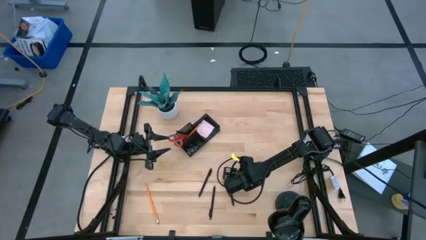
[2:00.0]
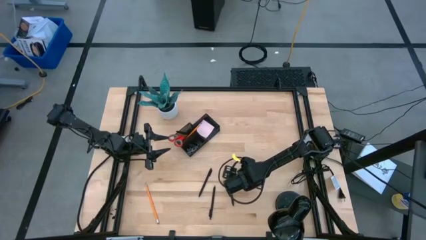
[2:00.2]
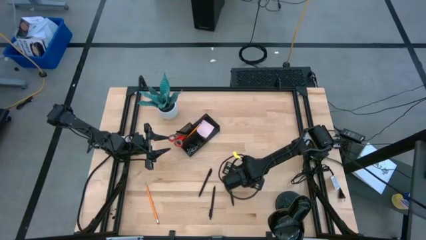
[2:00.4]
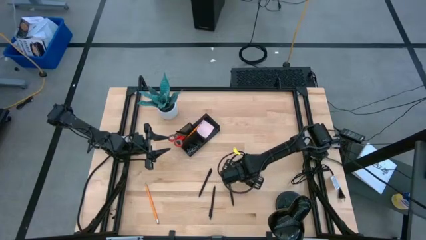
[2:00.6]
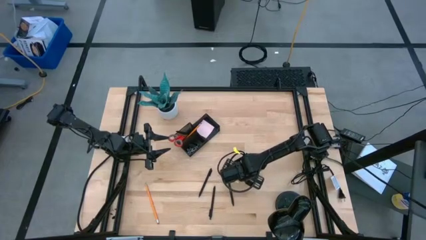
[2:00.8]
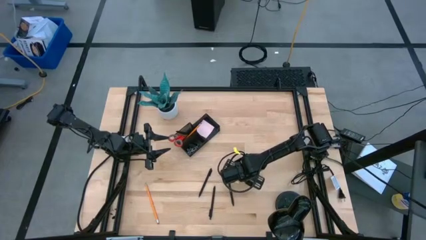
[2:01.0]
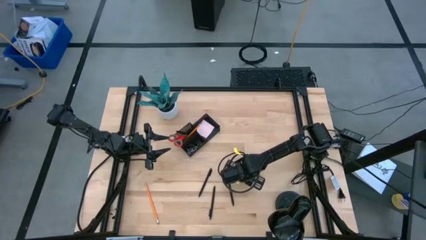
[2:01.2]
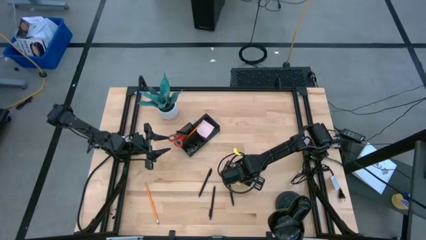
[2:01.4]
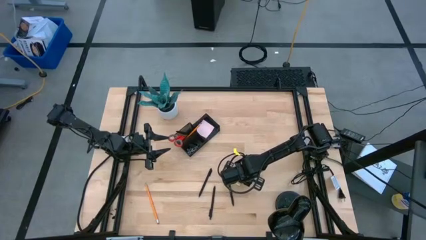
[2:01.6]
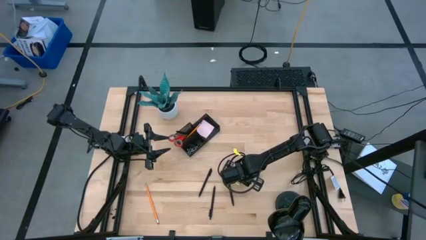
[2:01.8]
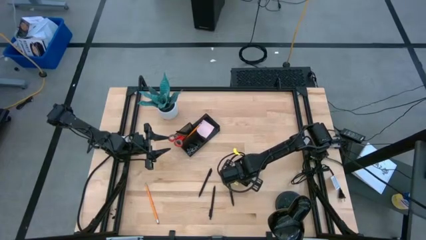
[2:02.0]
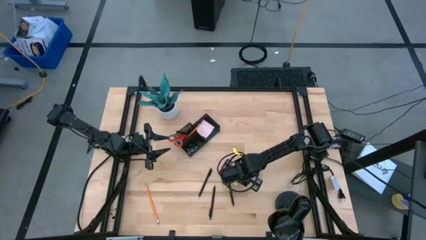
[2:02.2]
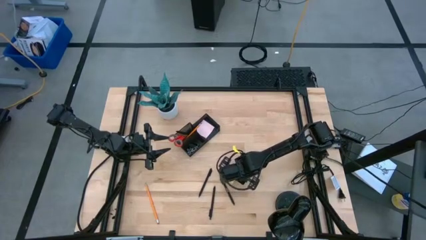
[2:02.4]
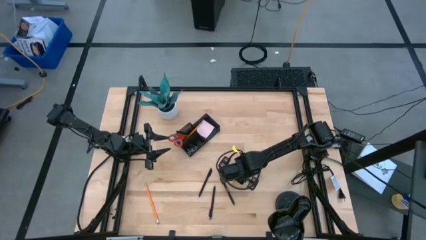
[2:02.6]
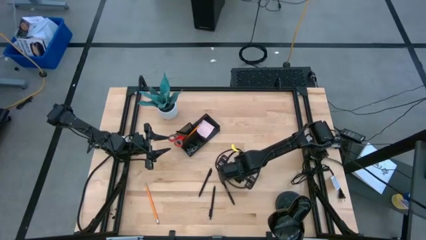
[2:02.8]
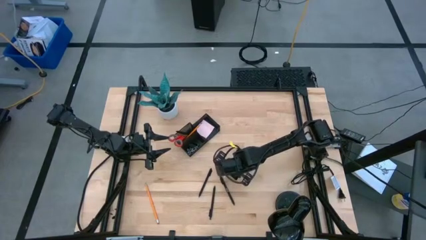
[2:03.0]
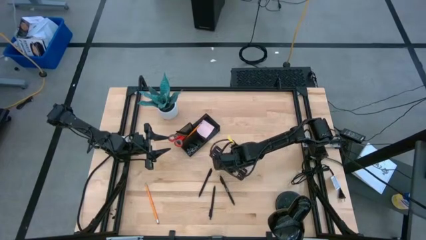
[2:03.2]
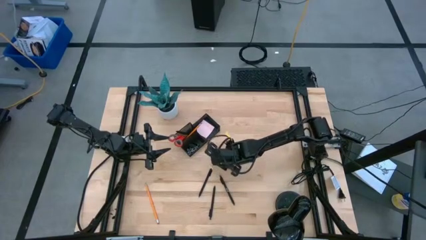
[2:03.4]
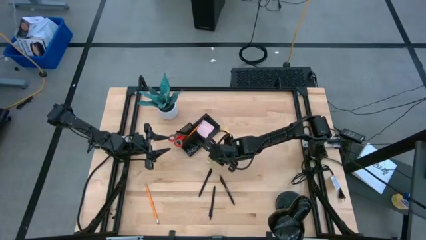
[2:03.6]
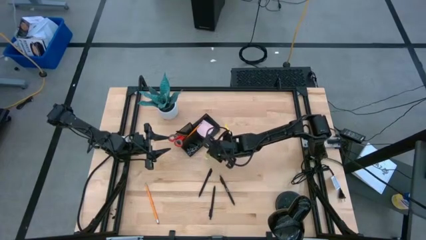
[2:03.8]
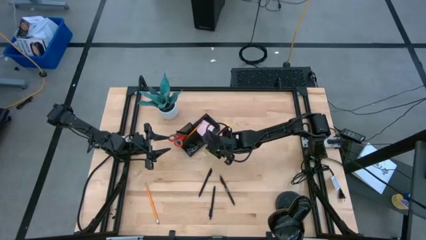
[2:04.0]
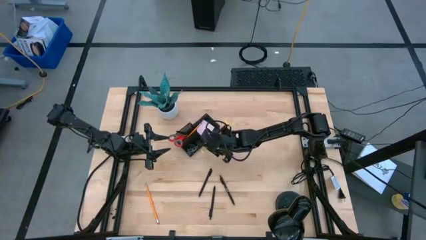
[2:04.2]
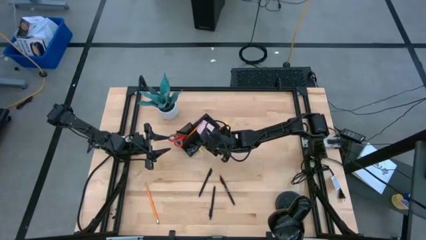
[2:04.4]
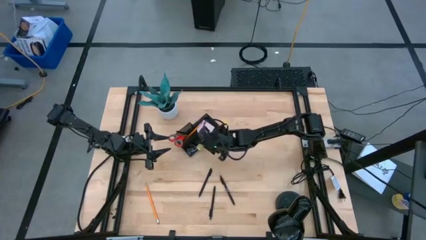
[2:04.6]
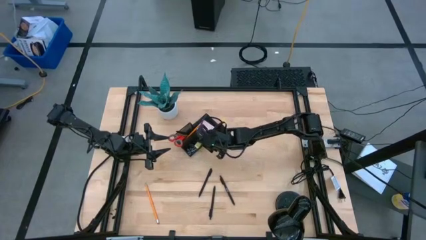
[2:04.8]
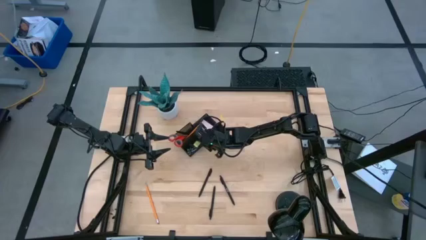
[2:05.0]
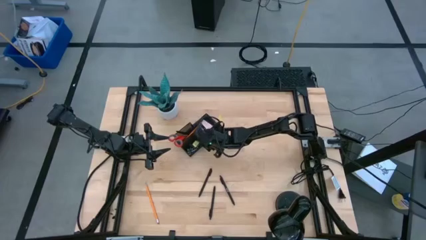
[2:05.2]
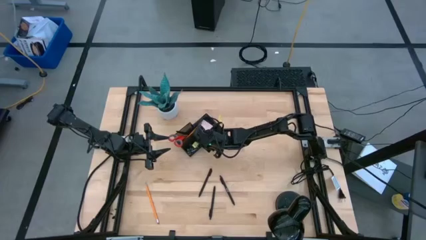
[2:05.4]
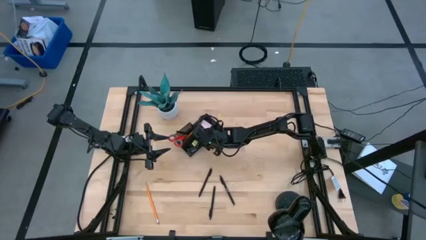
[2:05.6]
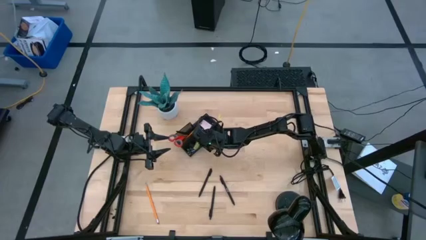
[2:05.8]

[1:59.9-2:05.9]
Task: Pick and place office supplies into organizer
Put the green eraser into the black desk organizer

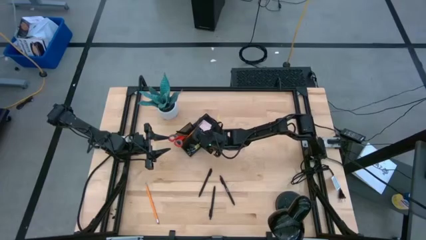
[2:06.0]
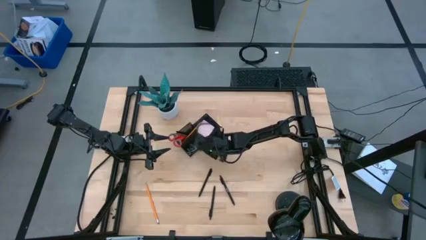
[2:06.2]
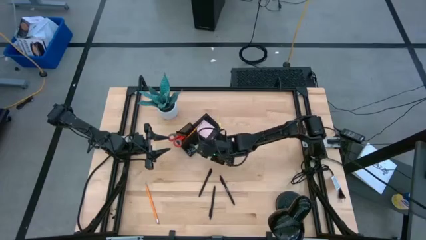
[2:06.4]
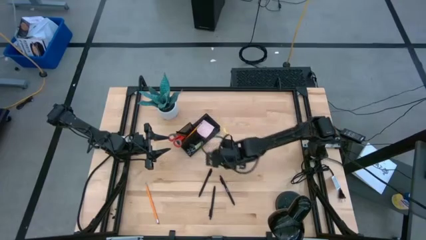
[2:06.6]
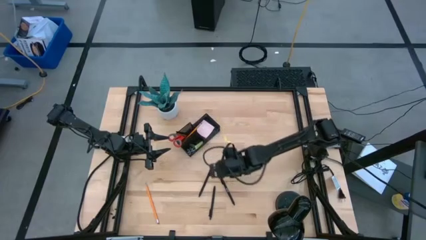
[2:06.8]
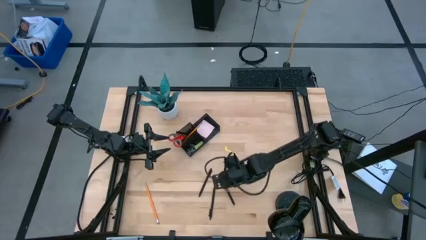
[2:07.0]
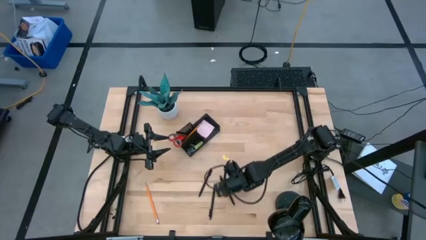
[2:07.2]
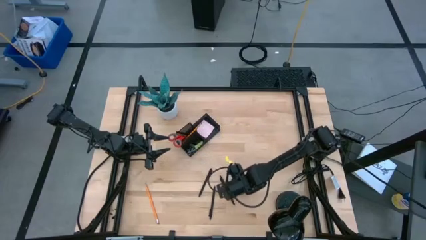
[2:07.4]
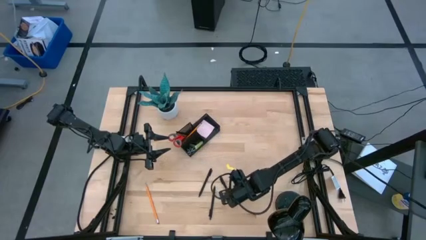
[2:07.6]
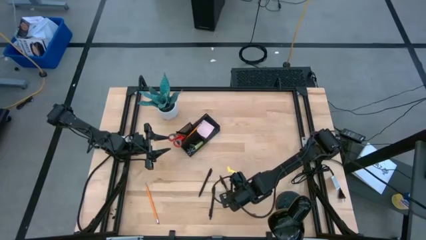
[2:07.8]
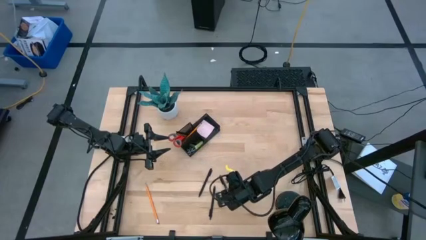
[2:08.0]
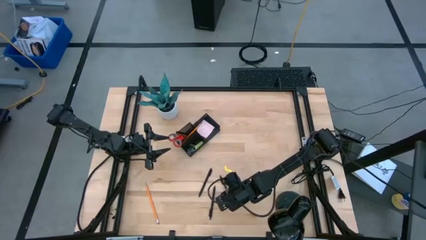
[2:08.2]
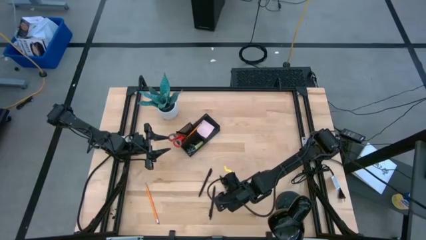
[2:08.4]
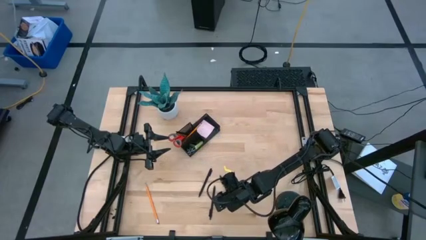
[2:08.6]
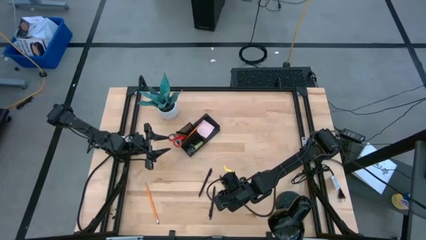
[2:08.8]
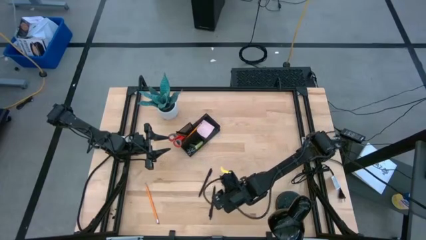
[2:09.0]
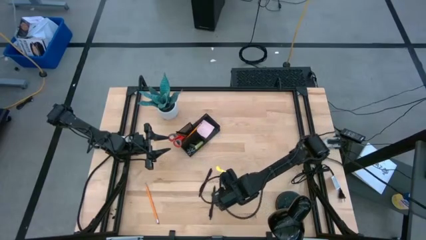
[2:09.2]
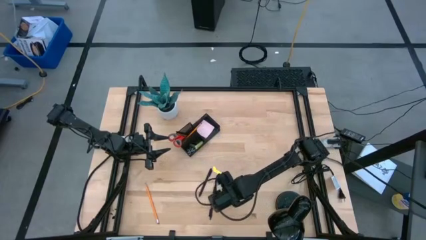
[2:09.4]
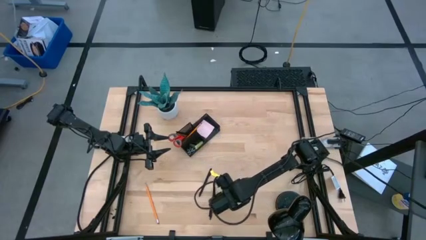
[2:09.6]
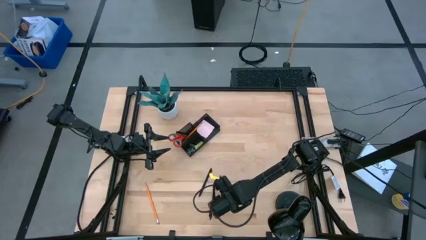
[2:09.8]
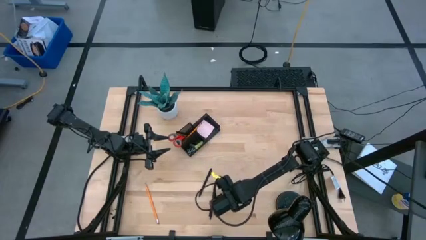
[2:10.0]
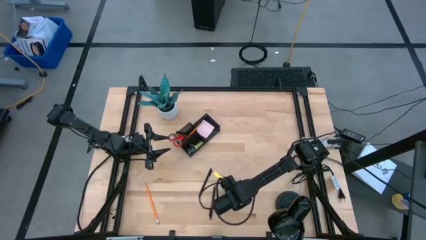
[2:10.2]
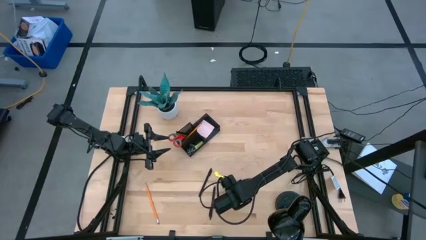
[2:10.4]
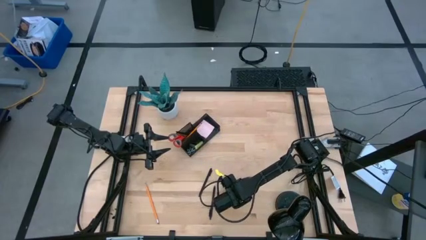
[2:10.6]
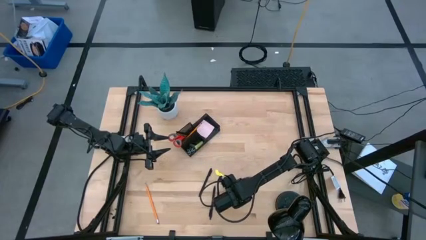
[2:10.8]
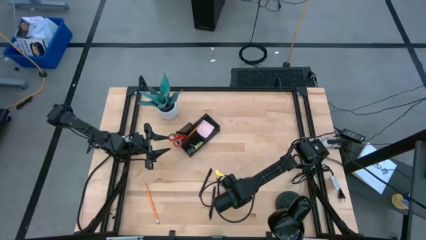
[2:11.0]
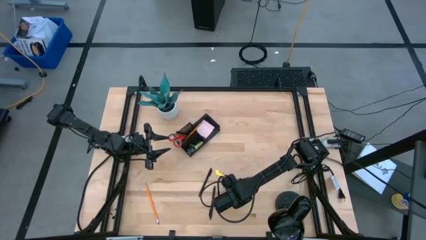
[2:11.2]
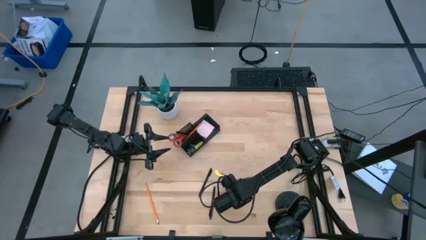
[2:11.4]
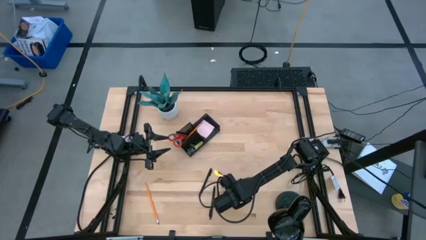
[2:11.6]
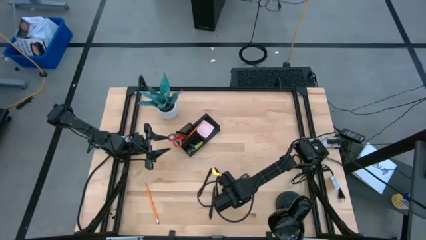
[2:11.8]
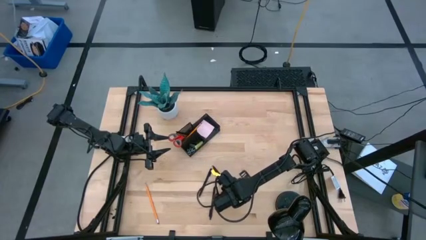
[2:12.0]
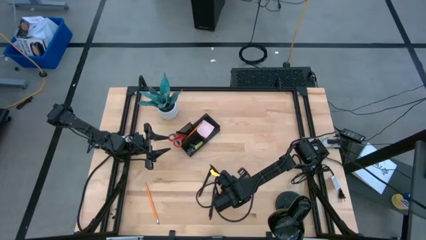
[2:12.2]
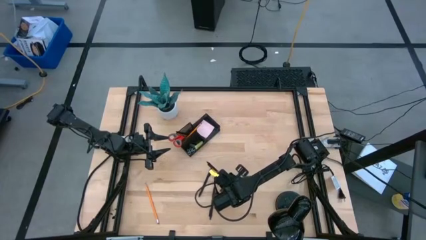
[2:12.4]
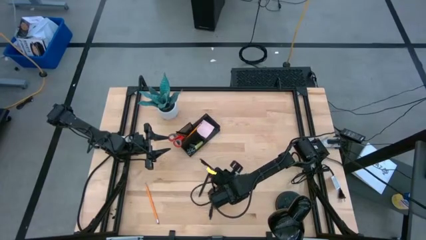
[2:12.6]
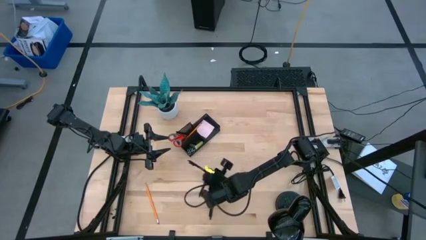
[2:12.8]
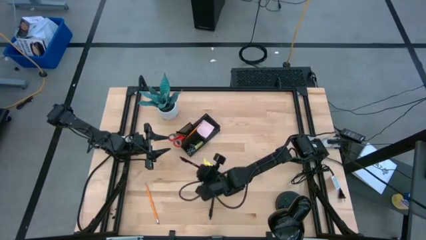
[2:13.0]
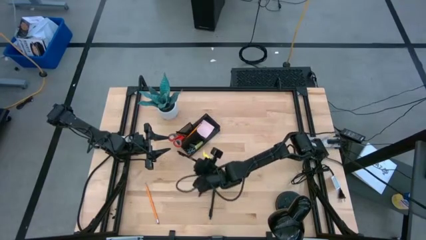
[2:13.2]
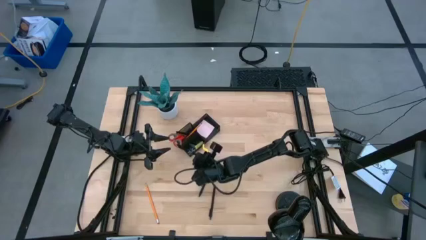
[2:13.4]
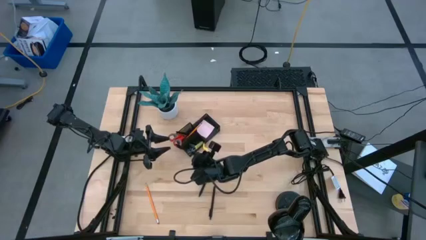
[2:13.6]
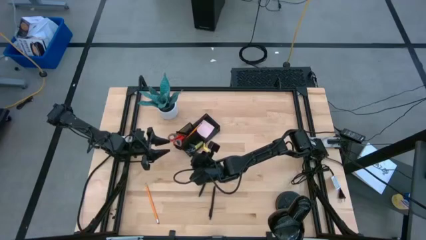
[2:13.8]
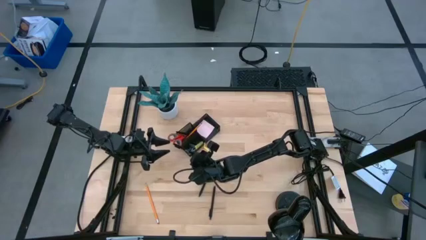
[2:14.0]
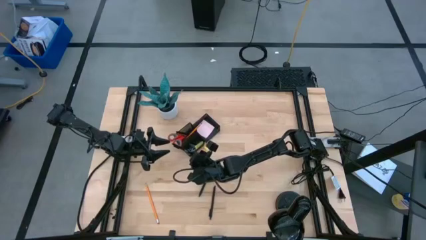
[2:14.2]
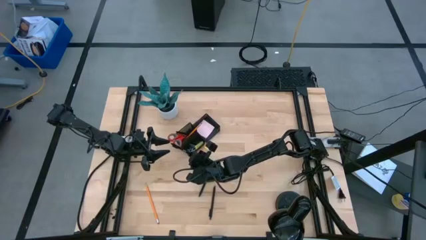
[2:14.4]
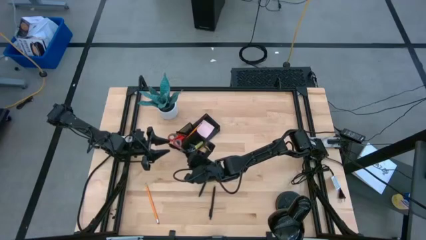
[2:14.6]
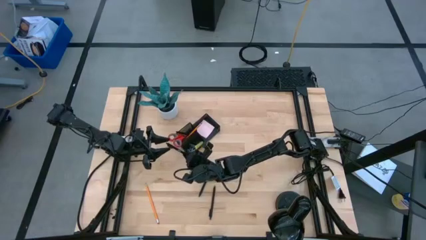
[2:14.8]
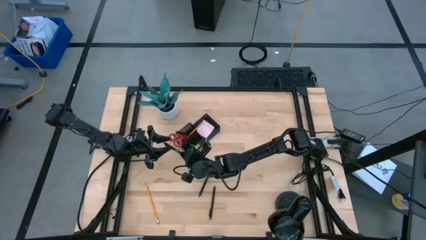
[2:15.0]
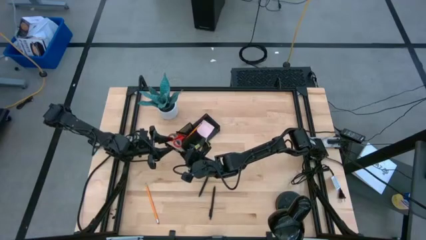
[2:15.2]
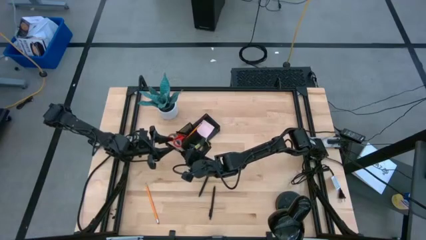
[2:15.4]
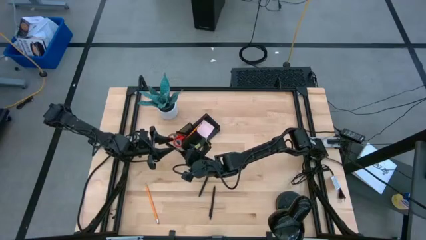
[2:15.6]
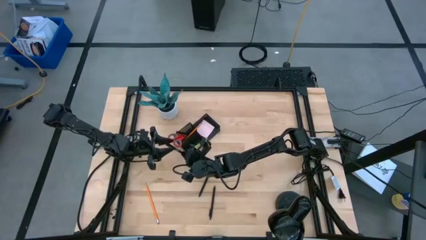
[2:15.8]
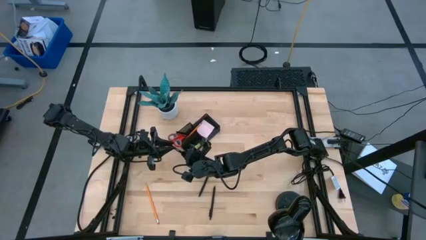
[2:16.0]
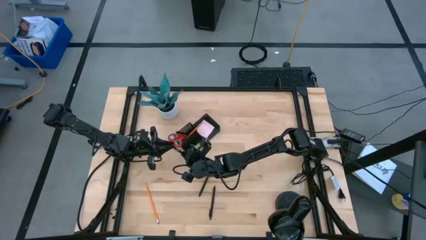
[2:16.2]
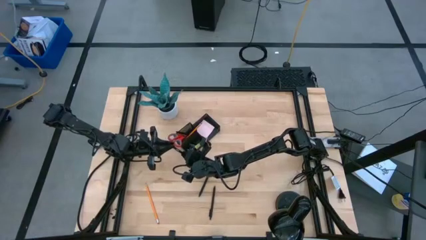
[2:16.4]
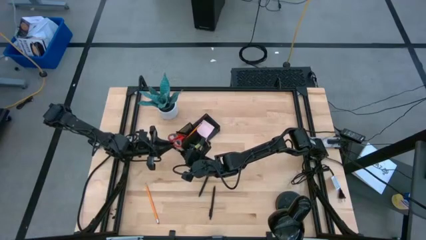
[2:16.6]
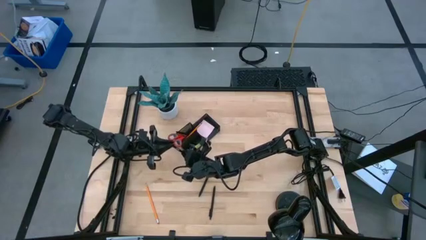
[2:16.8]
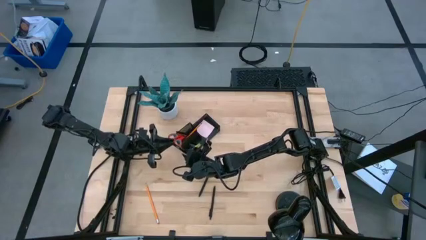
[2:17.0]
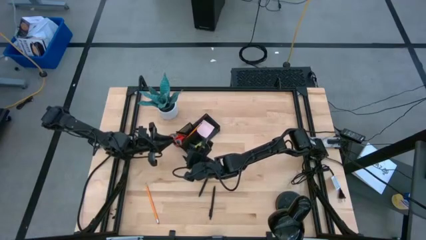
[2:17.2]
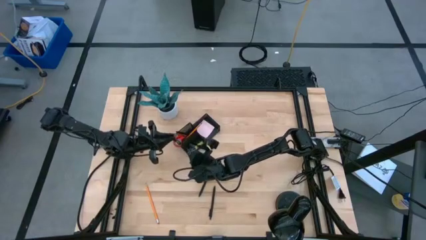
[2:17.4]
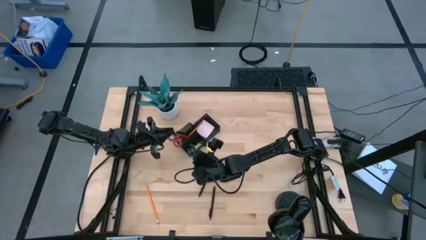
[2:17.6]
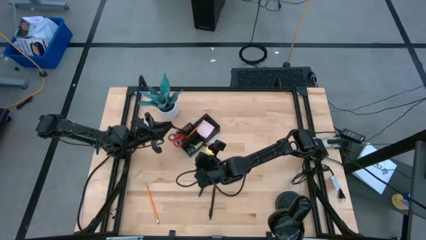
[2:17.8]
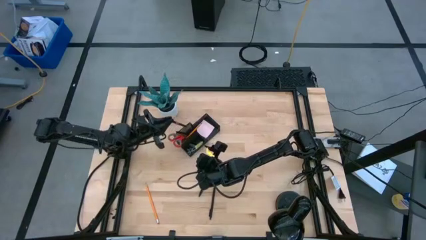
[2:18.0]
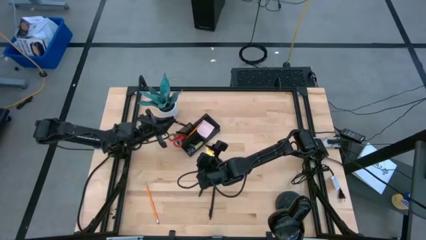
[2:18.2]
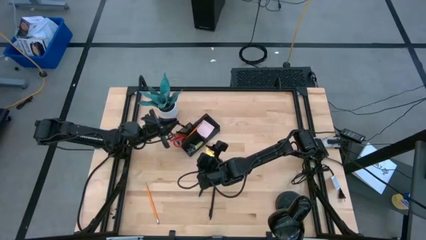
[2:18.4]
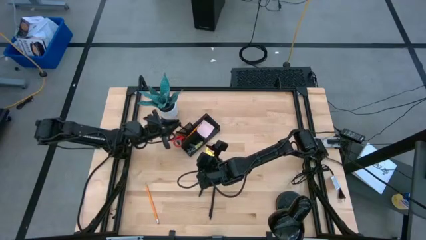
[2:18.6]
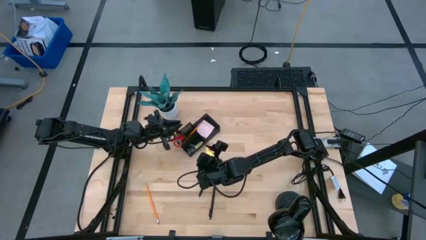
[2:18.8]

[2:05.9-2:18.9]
Put the black pen into the black desk organizer
